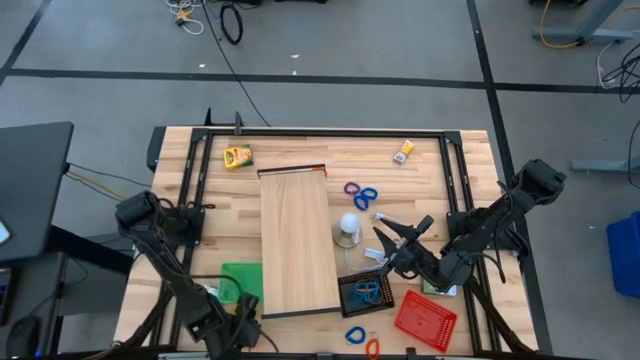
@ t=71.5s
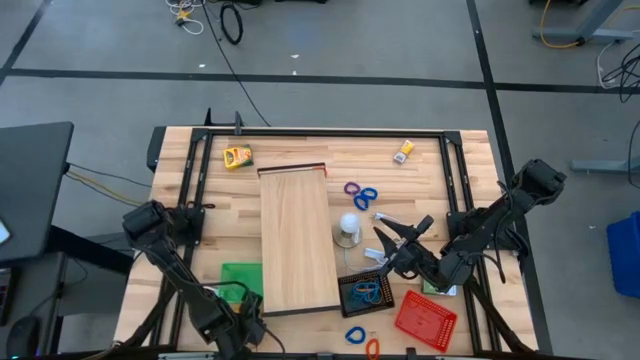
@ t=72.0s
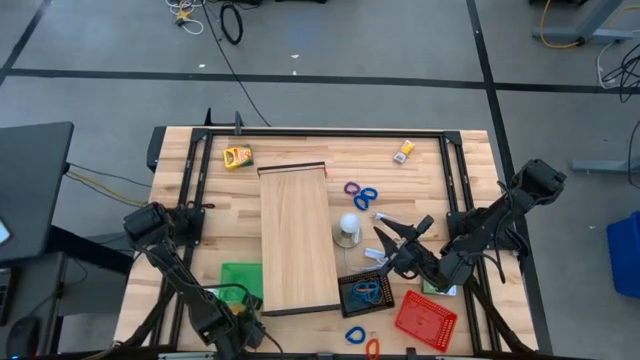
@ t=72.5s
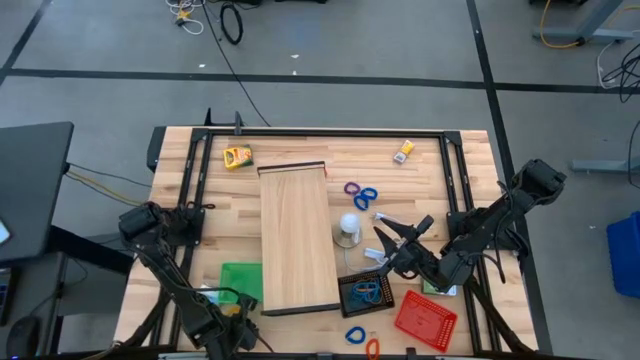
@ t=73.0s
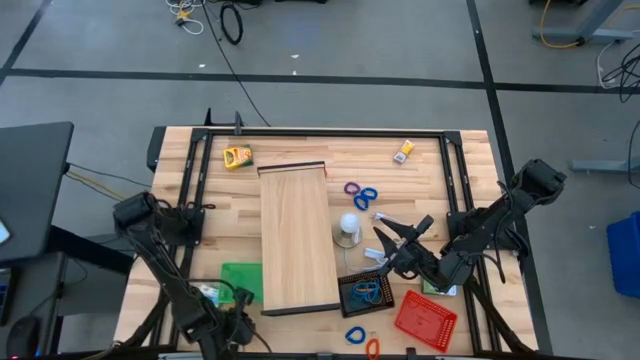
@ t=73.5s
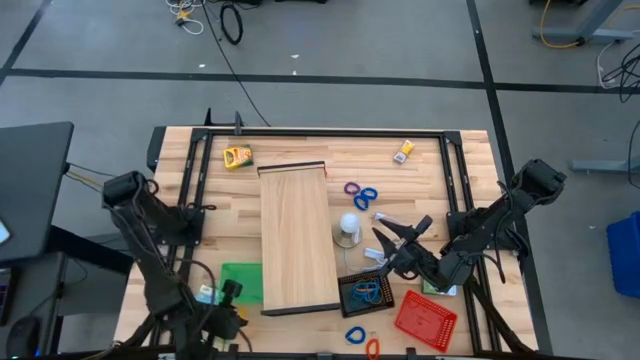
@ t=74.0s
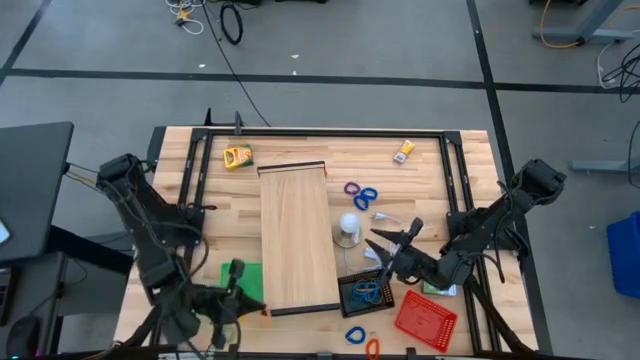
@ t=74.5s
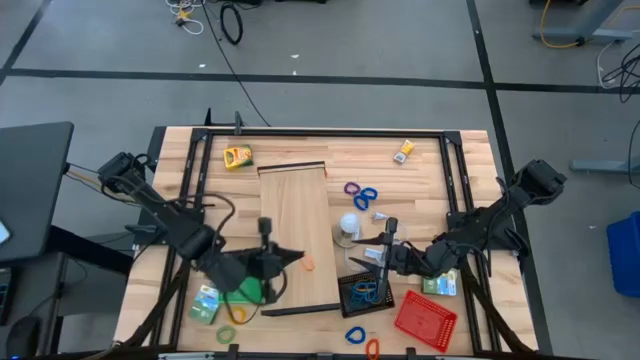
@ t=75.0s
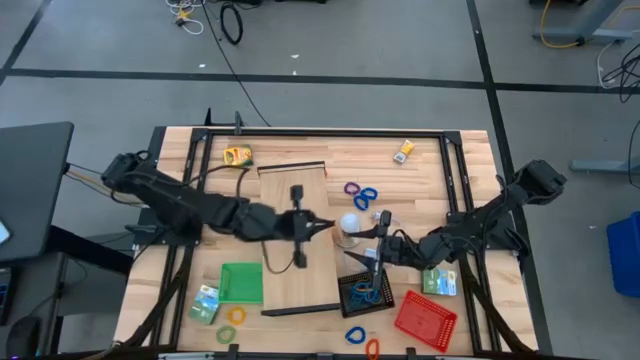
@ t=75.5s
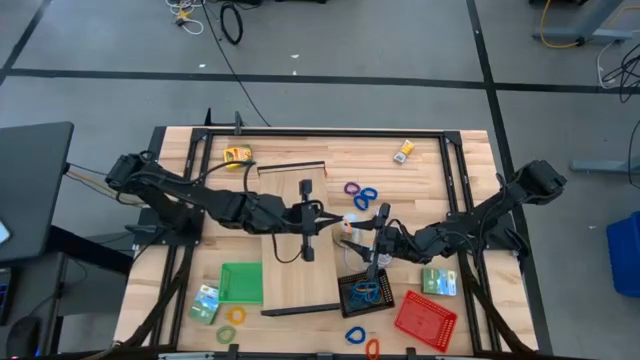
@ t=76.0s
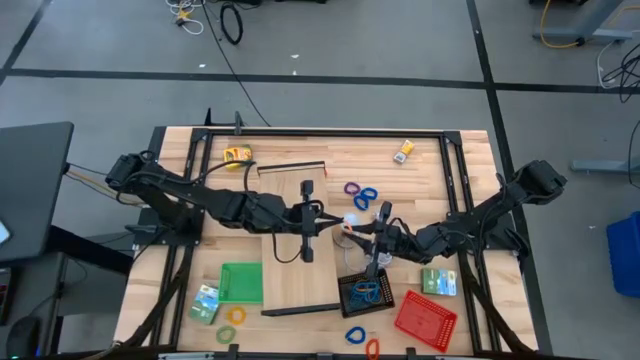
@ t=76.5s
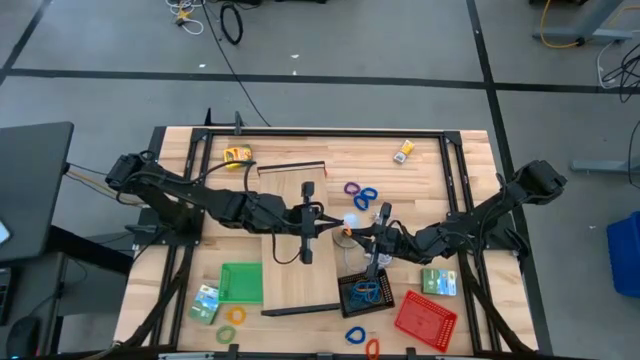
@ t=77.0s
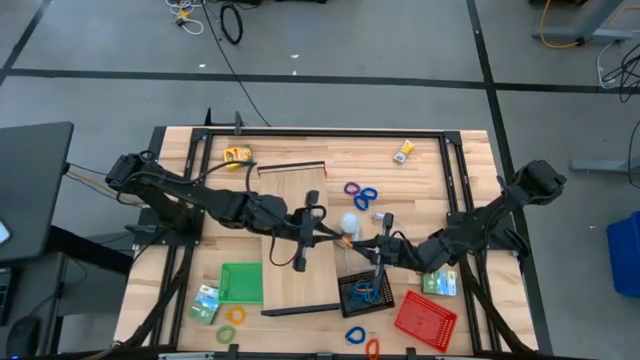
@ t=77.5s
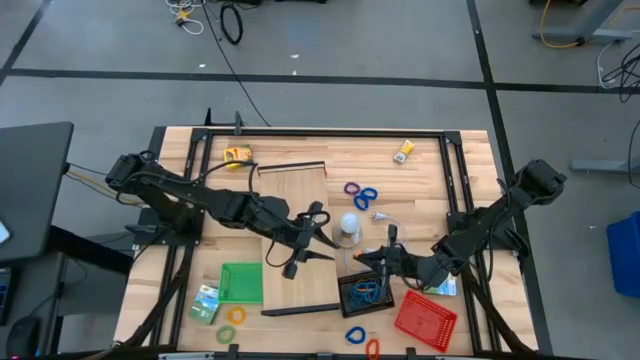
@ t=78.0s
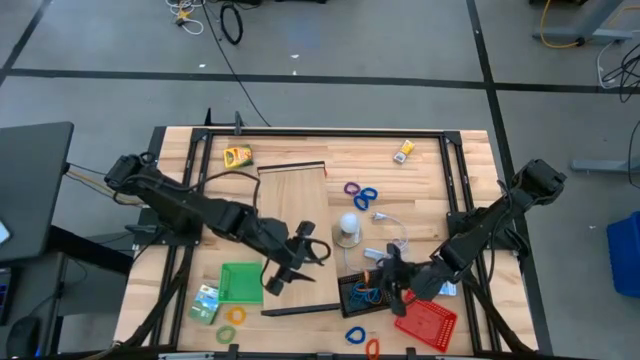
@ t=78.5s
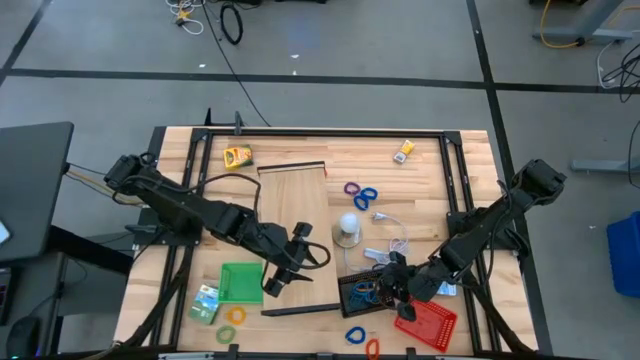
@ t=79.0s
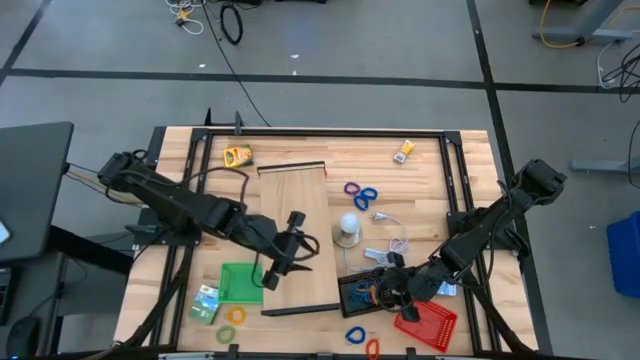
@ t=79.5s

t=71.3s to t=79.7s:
Task: Pick & Place Office Desk Supplies
Put the orange rubber band into the black bin

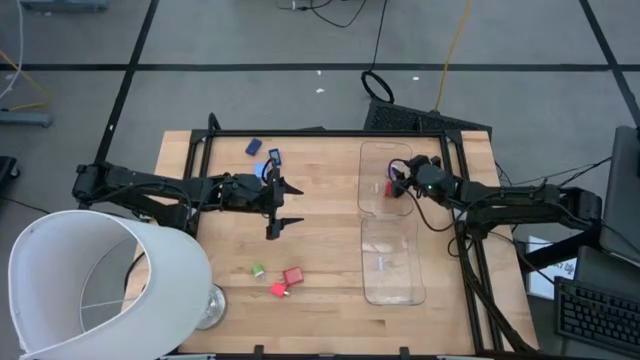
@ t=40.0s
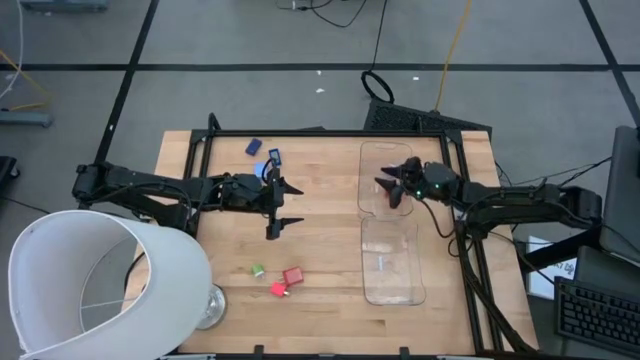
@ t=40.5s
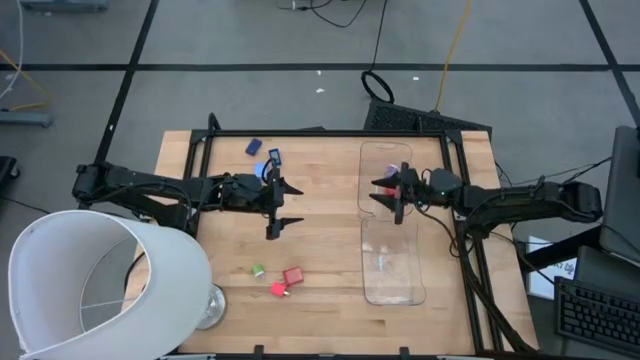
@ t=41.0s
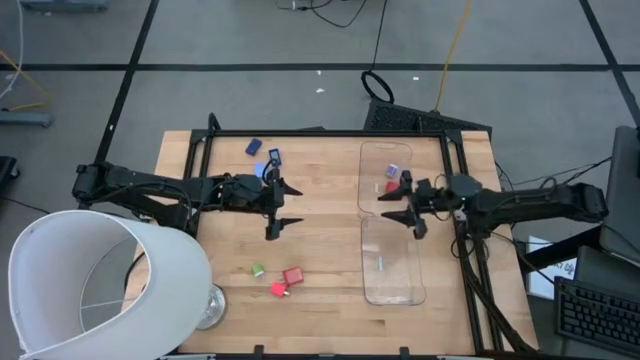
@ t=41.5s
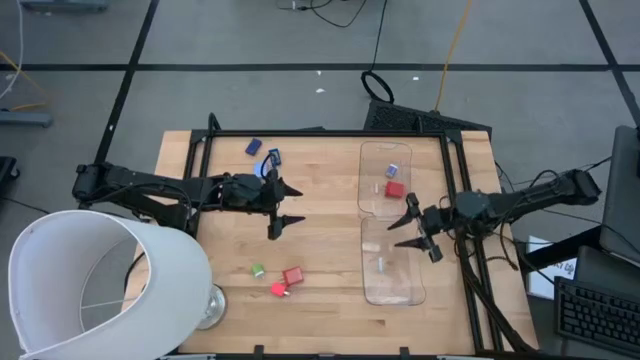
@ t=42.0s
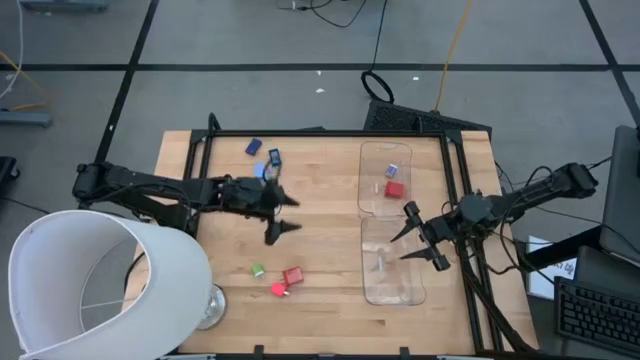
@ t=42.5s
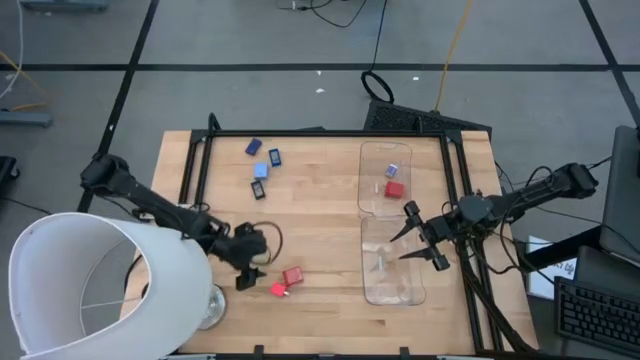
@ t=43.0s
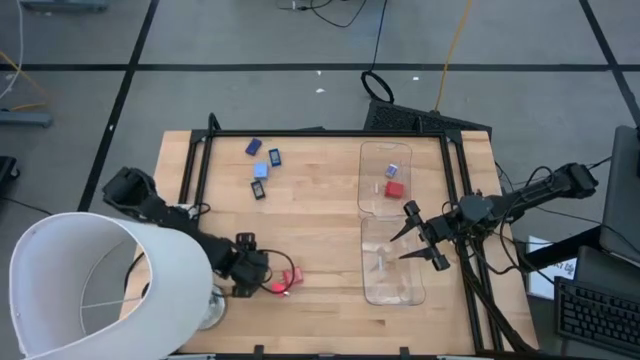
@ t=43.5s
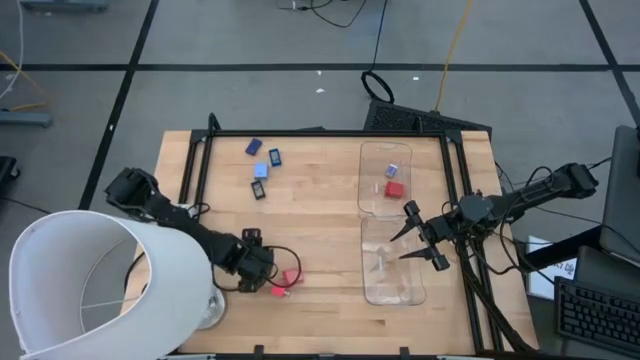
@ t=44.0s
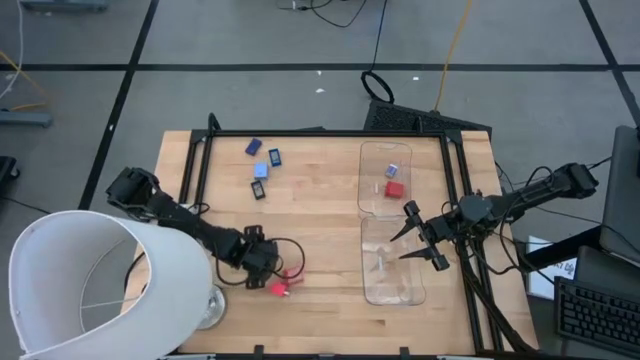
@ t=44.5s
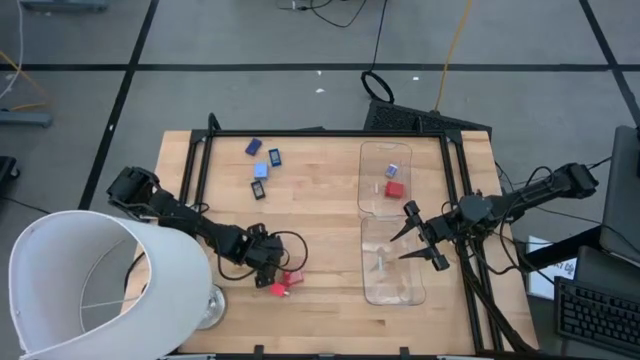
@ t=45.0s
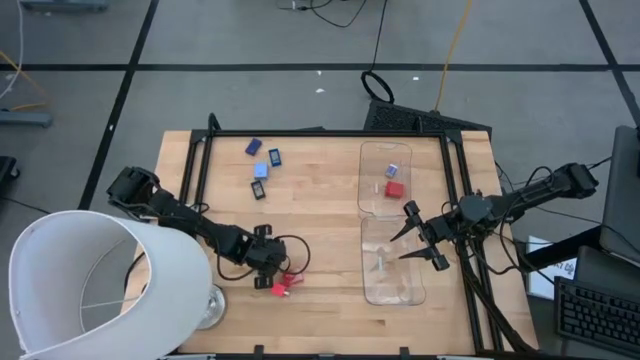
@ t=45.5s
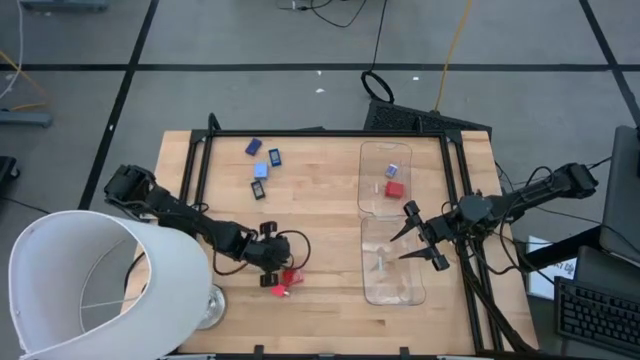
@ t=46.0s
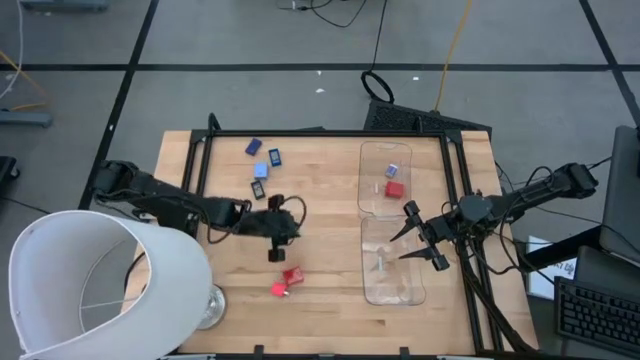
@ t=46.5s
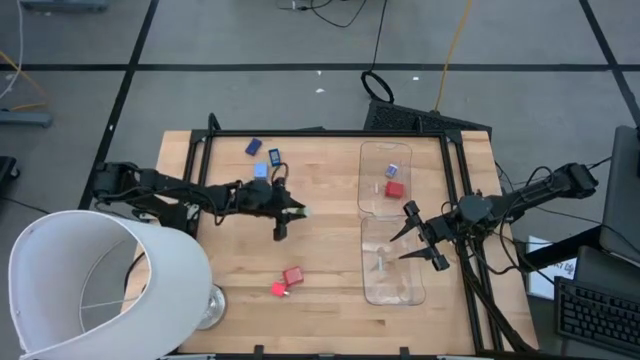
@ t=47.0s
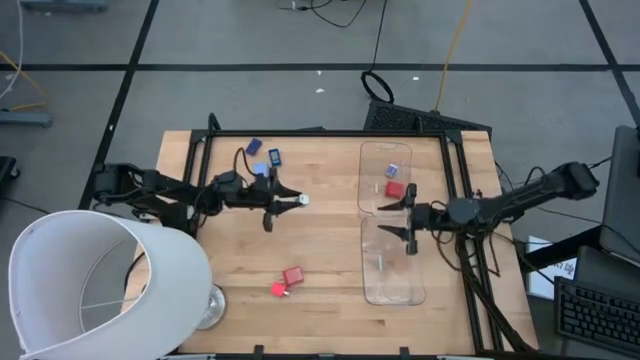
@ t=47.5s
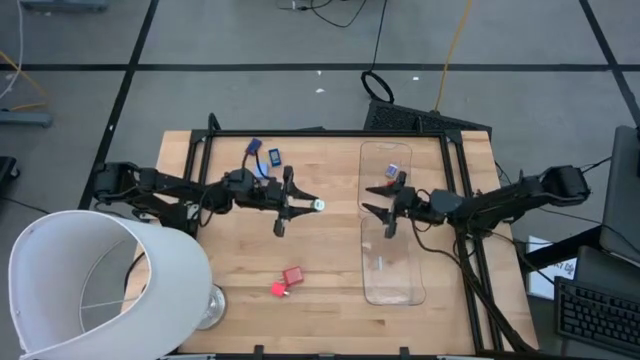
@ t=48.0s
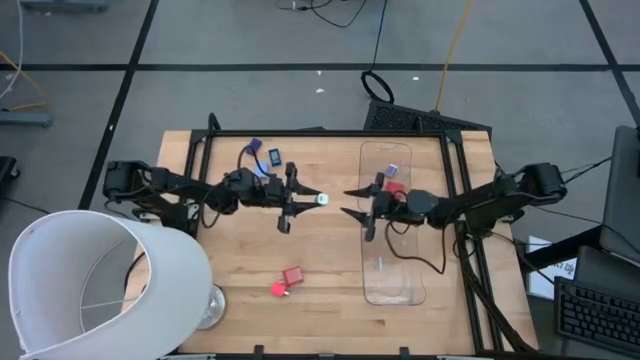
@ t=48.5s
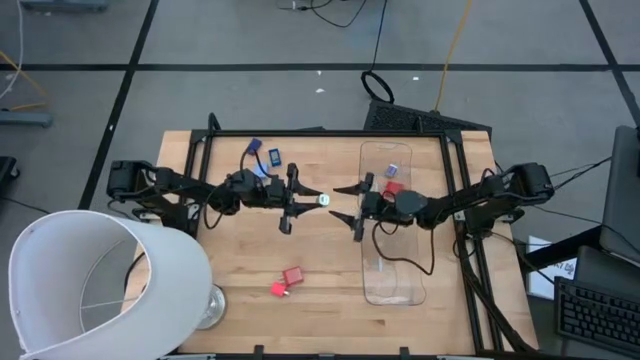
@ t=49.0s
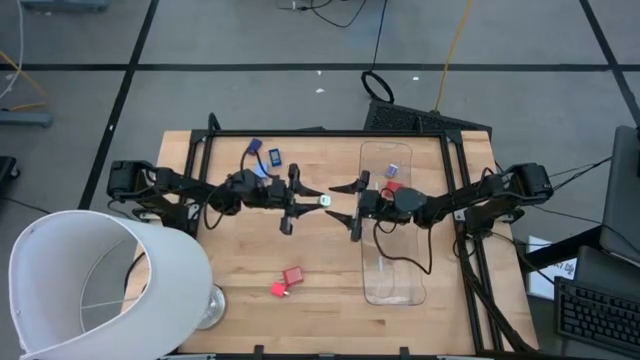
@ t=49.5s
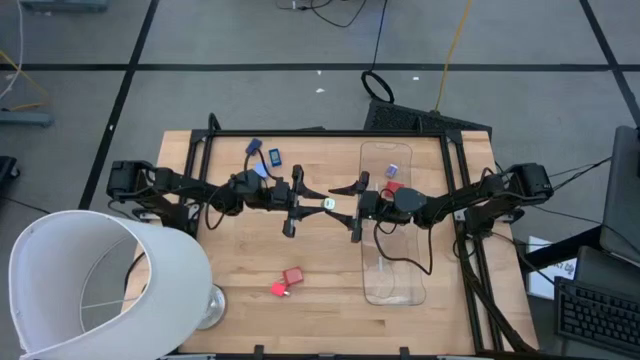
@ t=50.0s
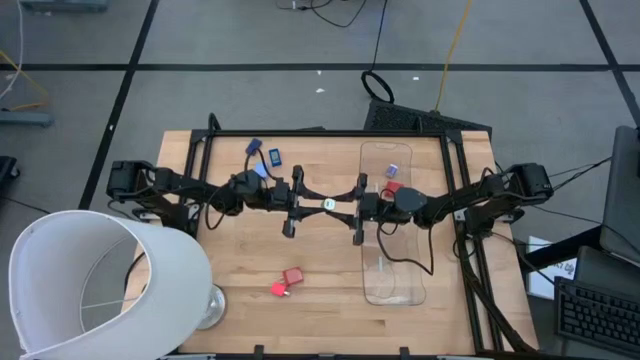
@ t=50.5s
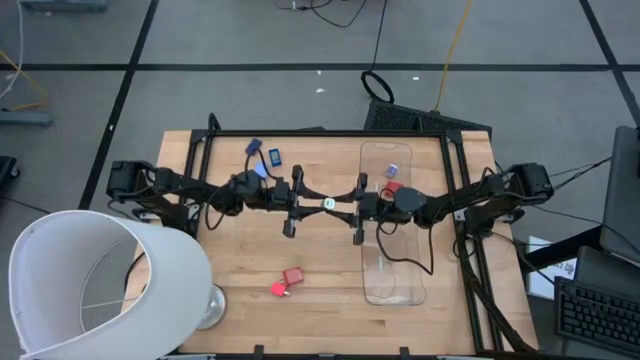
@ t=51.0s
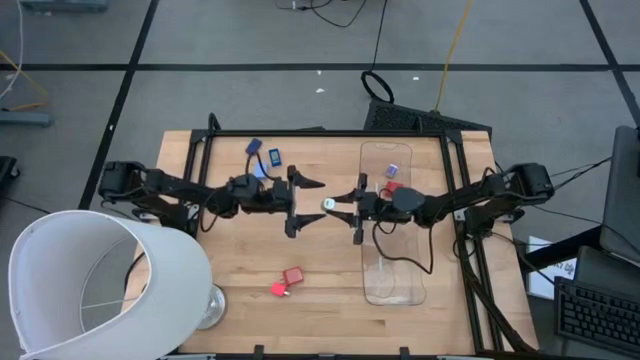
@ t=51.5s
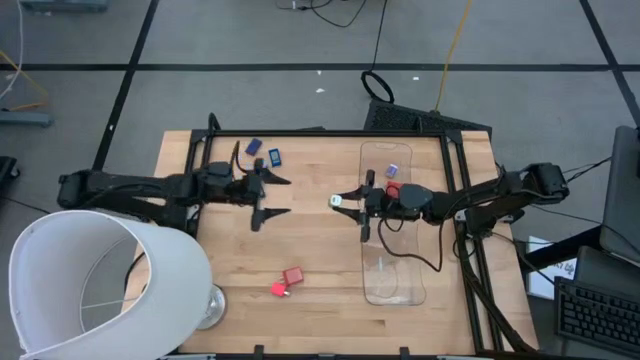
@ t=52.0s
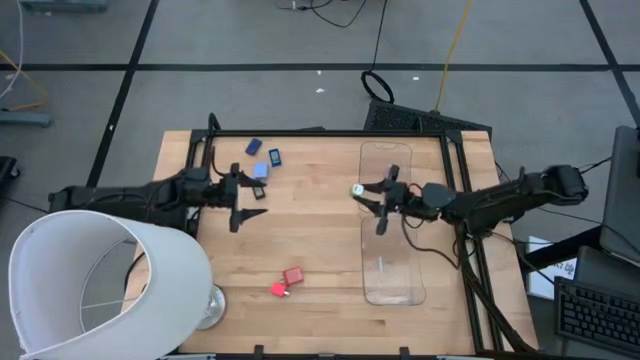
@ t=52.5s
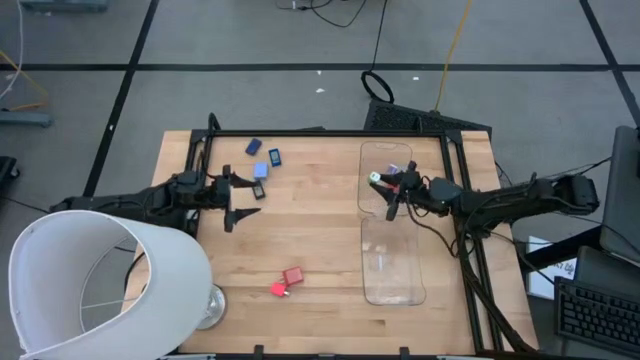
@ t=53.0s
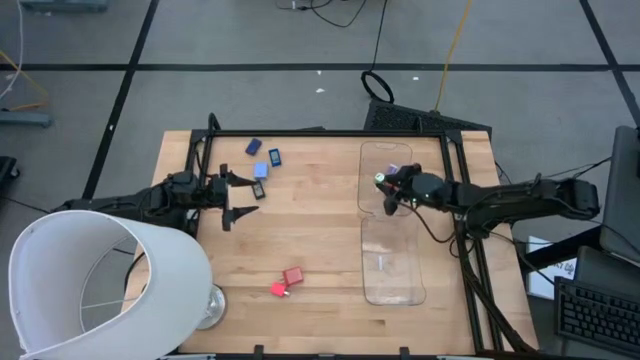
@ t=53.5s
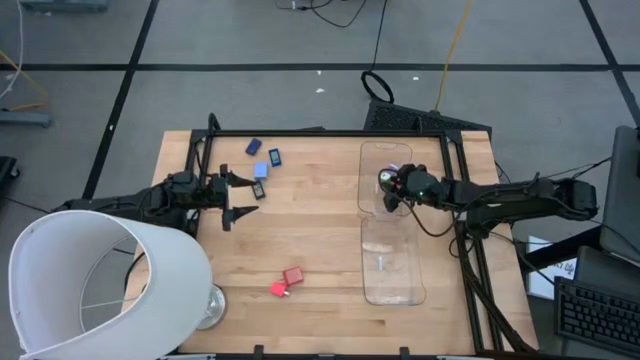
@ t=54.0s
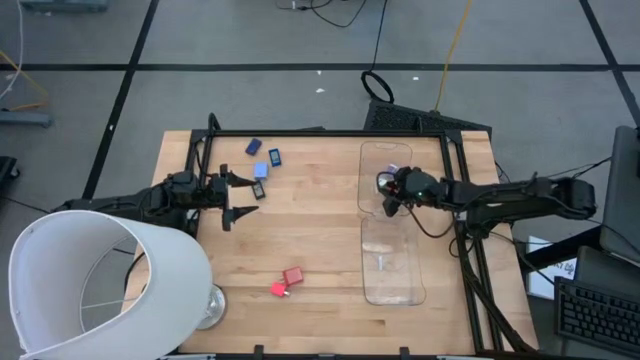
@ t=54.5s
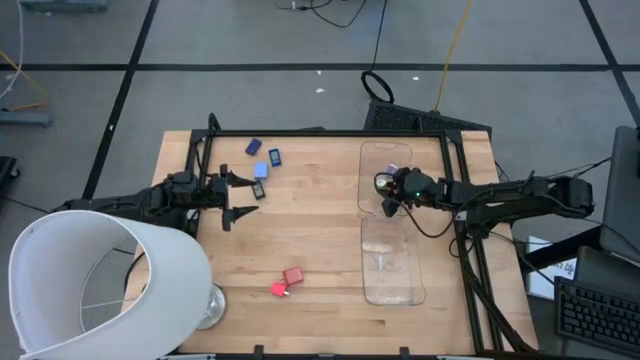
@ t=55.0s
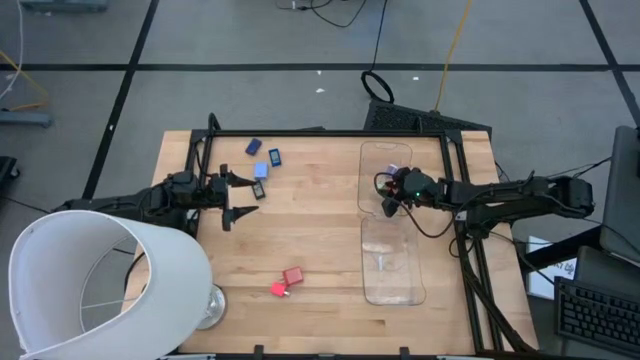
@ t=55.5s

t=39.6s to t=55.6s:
Task: Pick & Place Office items
Put the green charger adapter into the top transparent bin
